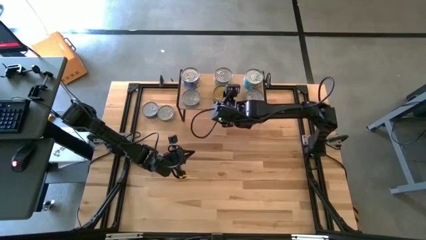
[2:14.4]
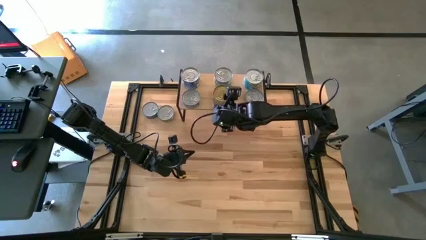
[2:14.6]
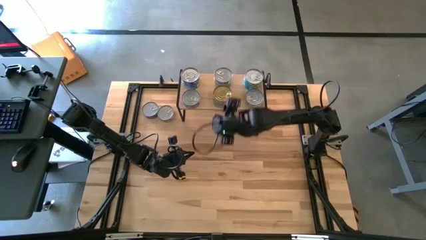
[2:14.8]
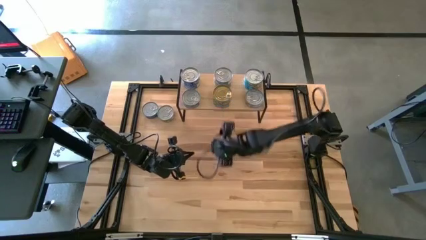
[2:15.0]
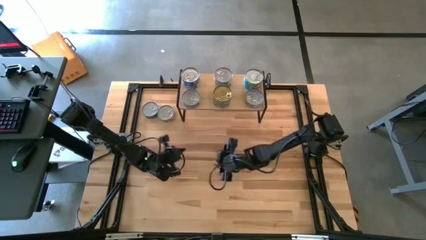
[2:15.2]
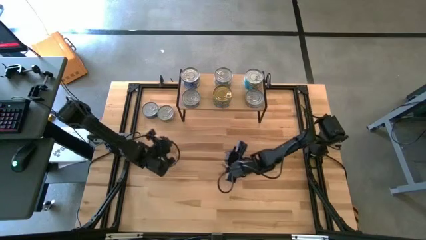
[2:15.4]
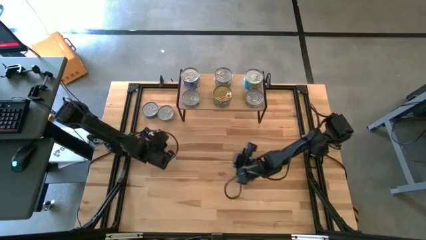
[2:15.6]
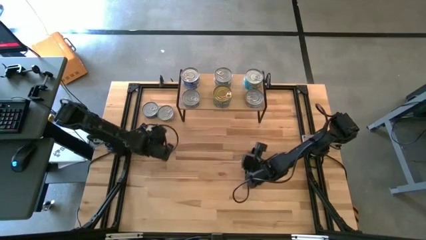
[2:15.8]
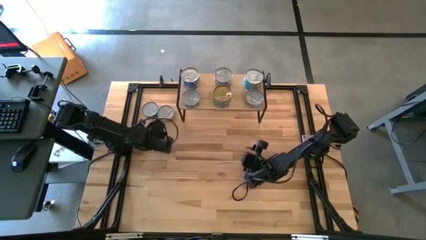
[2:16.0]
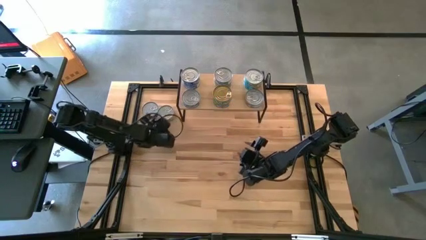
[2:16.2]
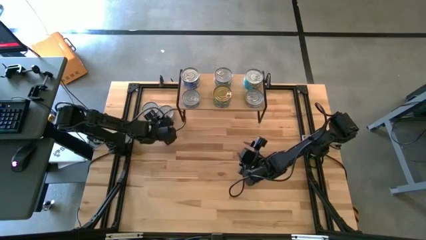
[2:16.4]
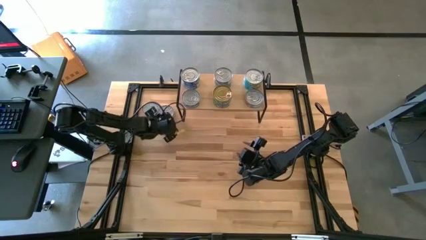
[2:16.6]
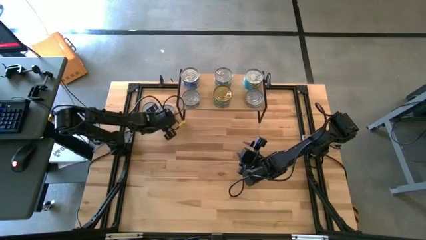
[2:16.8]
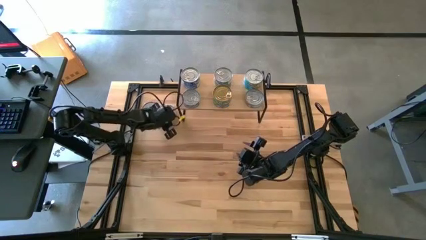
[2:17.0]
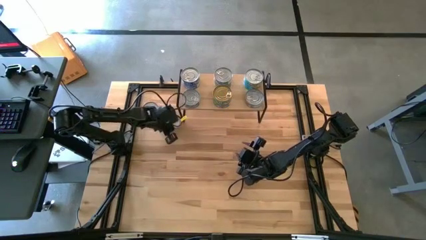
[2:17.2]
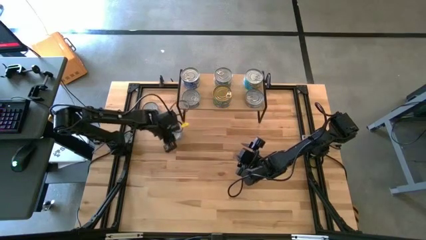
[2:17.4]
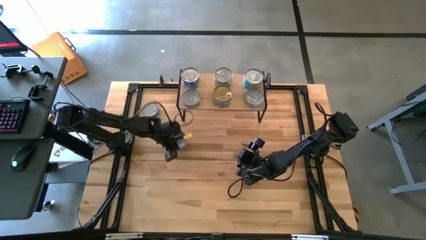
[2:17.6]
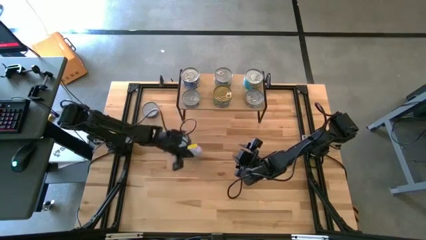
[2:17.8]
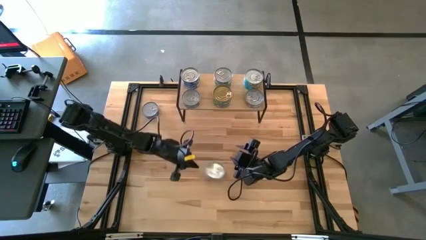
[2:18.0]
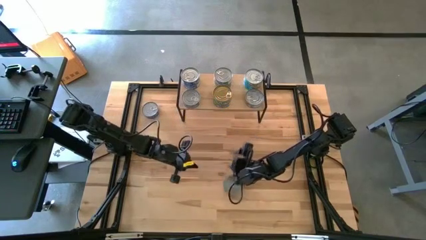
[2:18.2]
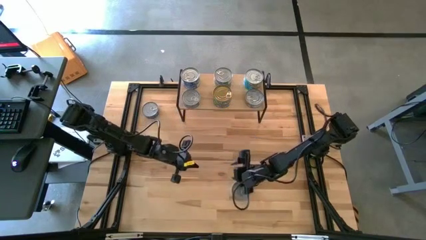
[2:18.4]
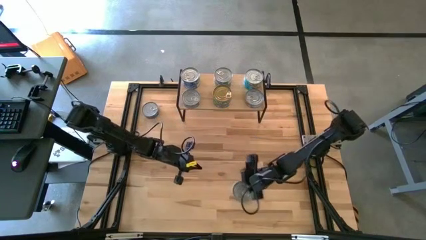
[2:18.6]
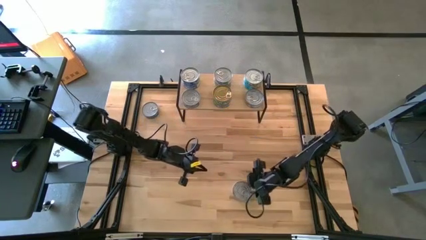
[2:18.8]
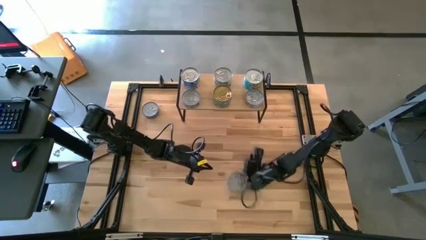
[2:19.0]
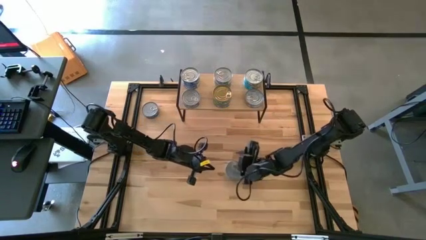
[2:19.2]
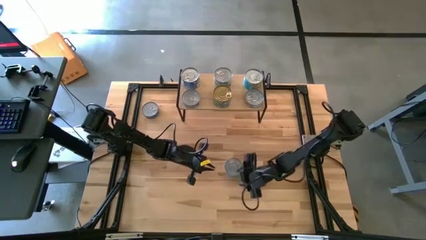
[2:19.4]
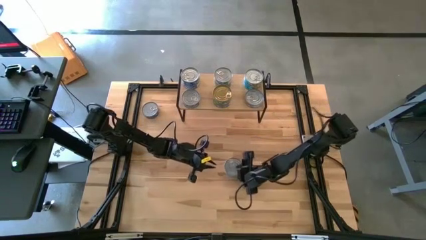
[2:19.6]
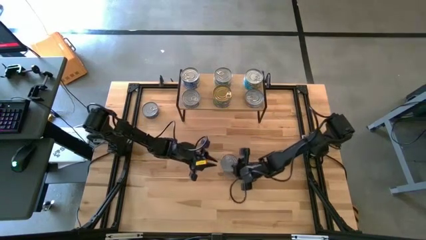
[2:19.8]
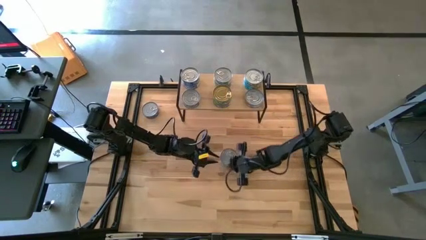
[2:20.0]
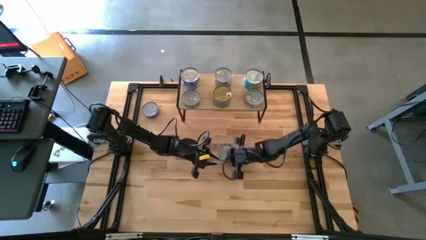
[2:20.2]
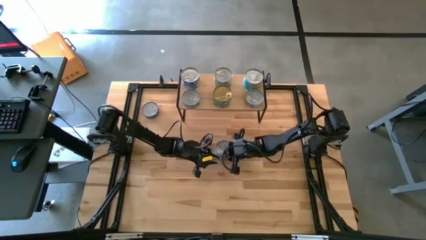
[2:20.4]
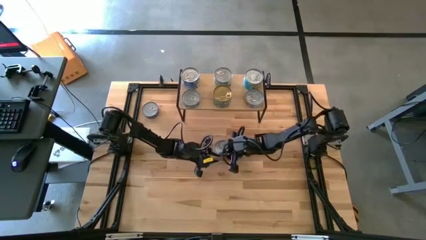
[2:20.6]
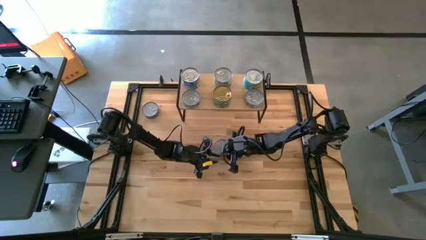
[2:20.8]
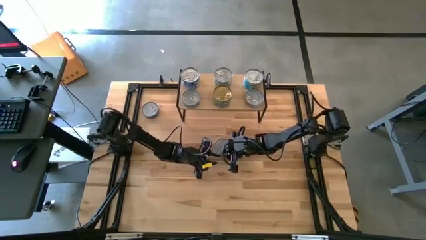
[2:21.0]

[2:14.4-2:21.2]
Task: Stack canned seafood by type on shelf
Stack the yellow tuna can on top of the yellow tuna can on the shelf

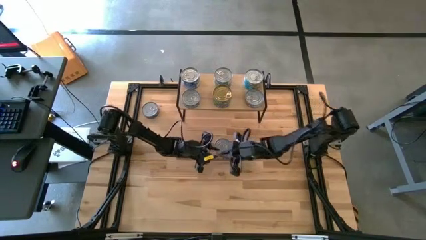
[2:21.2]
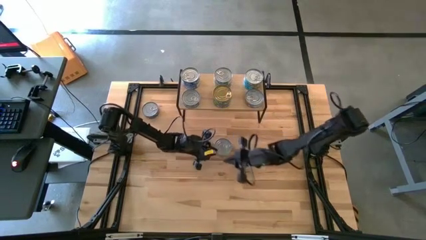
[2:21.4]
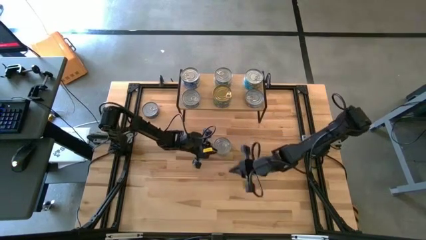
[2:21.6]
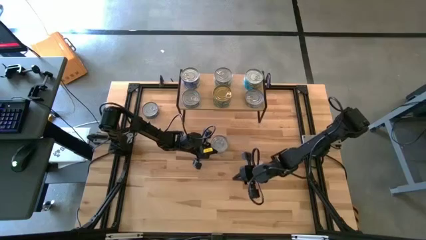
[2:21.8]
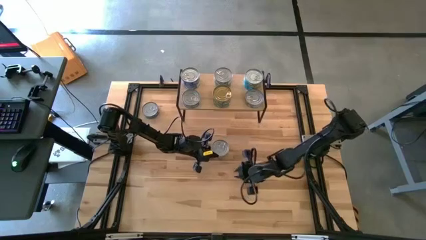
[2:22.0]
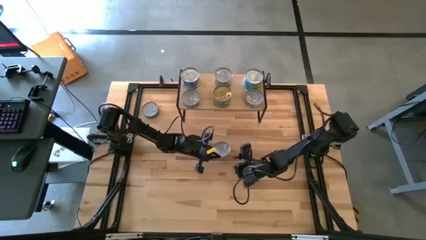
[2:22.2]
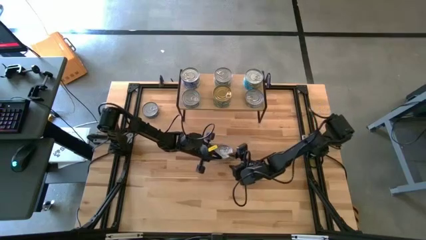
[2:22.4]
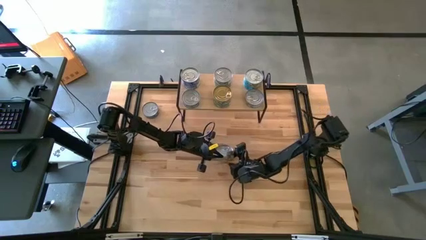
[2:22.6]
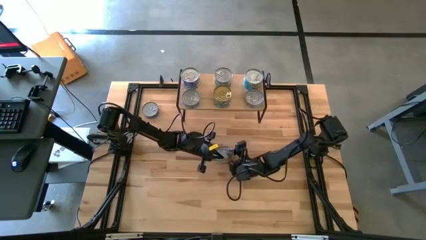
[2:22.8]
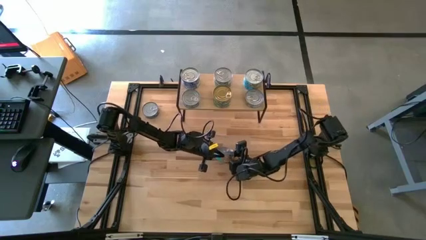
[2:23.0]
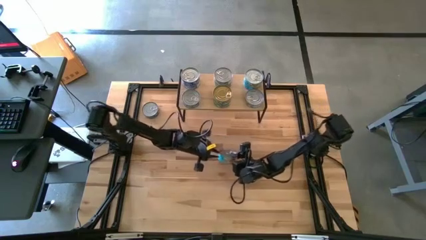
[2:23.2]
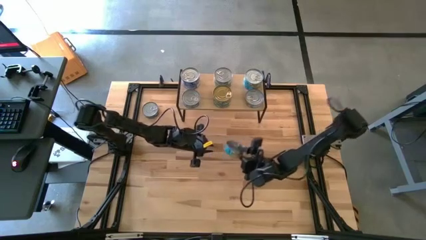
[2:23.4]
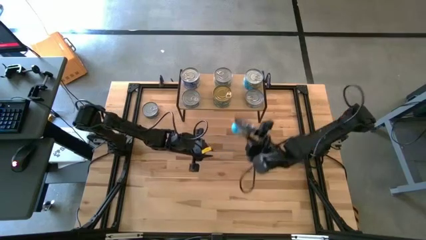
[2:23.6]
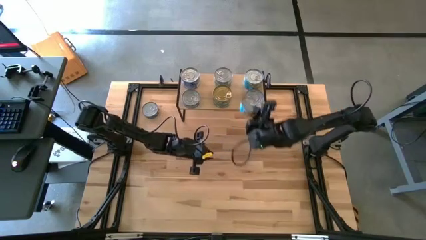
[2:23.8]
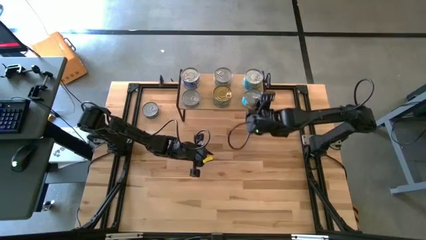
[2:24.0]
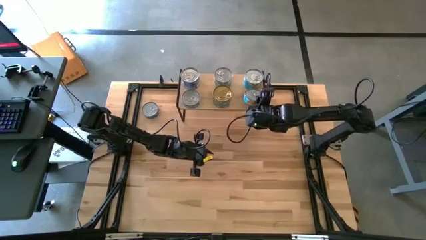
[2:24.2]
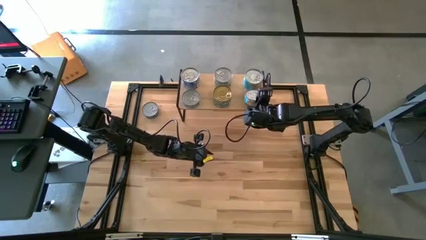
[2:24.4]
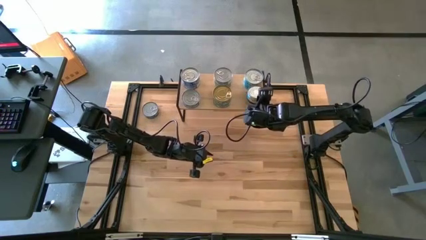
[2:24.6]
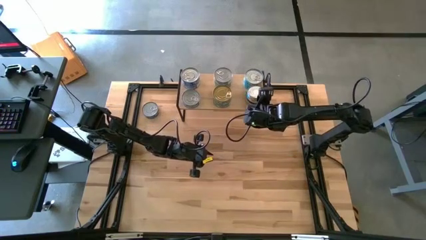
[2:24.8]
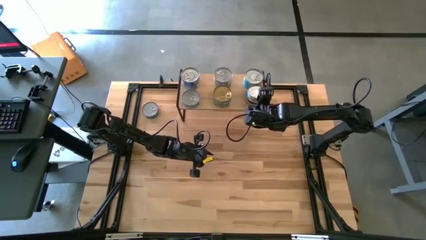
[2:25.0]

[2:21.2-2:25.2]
Stack the yellow tuna can on top of the yellow tuna can on the shelf
